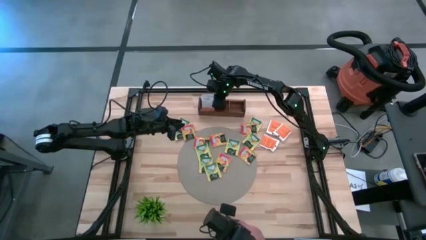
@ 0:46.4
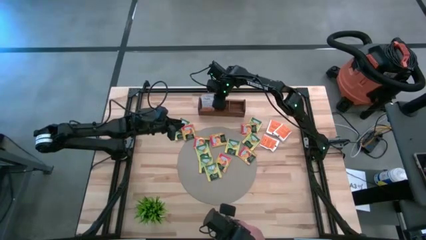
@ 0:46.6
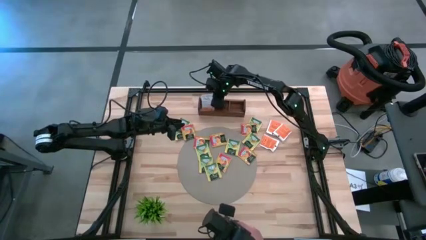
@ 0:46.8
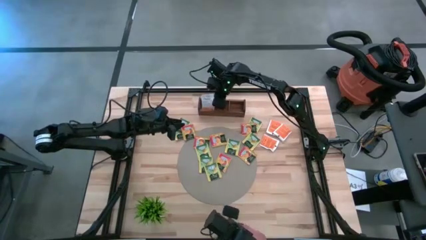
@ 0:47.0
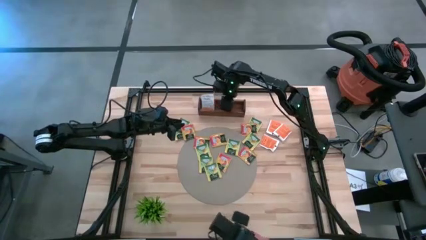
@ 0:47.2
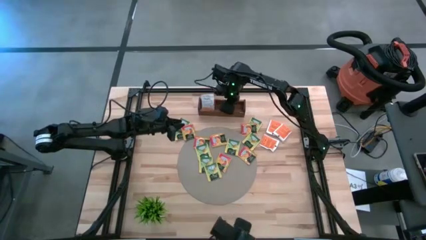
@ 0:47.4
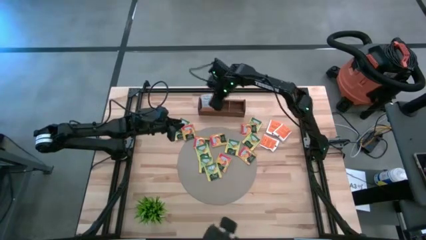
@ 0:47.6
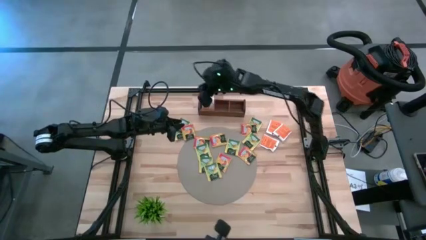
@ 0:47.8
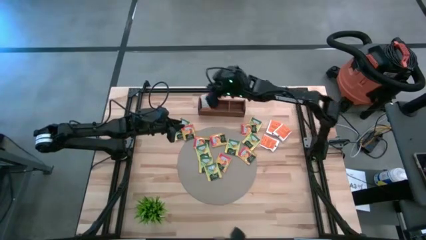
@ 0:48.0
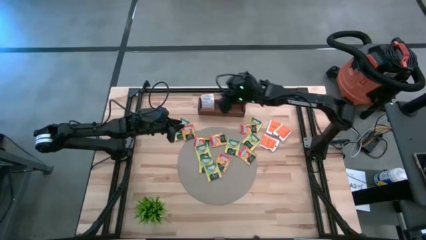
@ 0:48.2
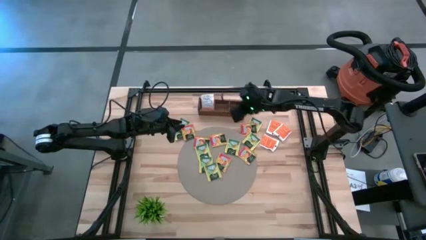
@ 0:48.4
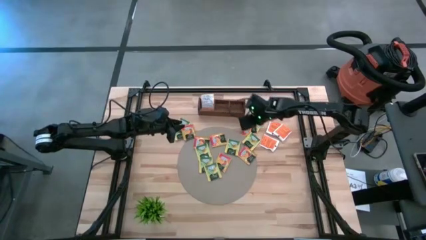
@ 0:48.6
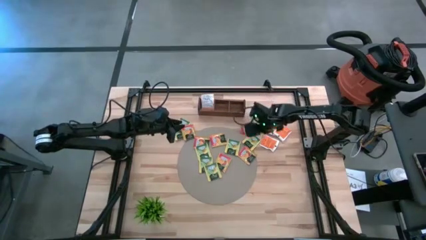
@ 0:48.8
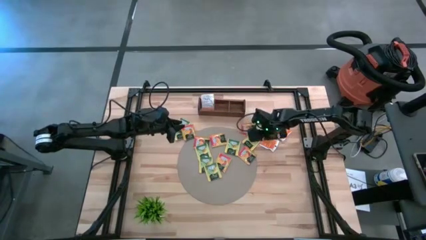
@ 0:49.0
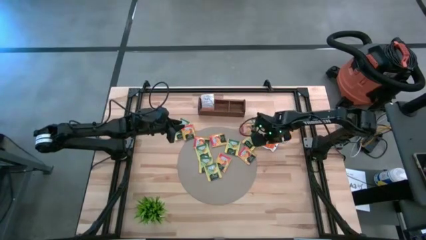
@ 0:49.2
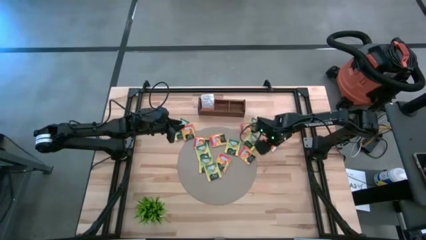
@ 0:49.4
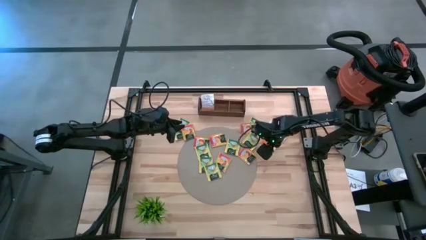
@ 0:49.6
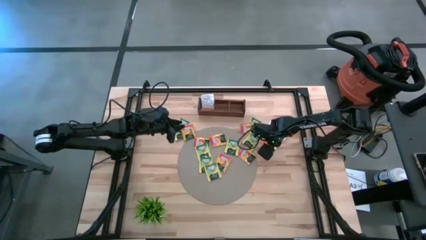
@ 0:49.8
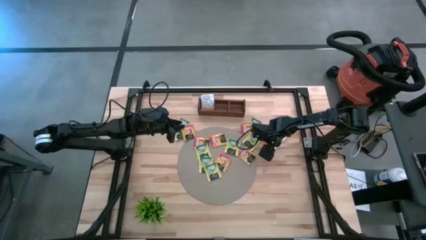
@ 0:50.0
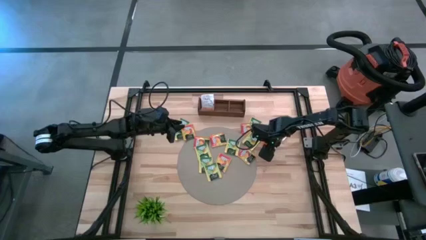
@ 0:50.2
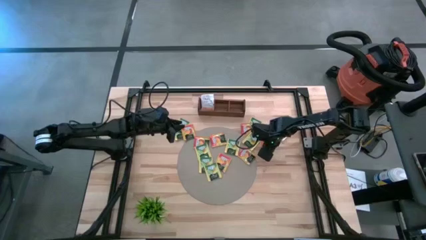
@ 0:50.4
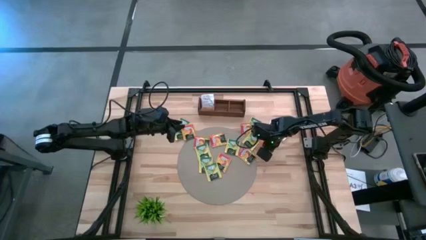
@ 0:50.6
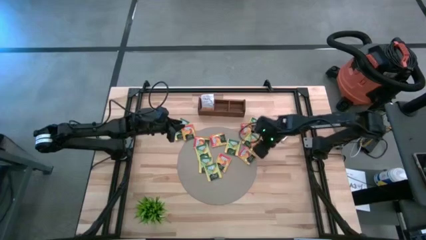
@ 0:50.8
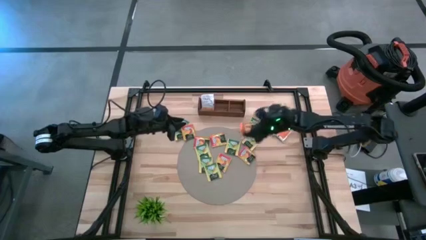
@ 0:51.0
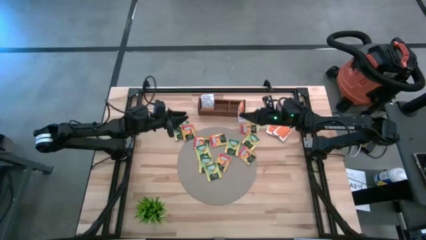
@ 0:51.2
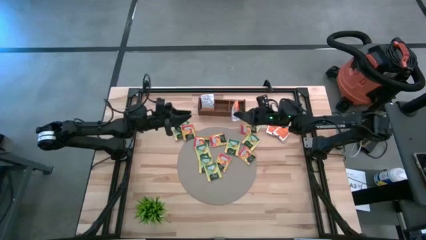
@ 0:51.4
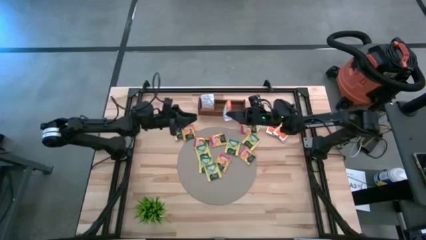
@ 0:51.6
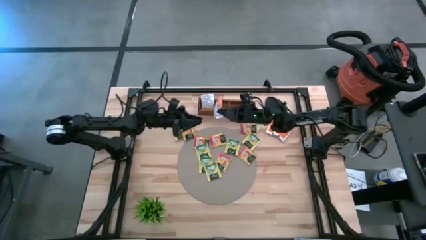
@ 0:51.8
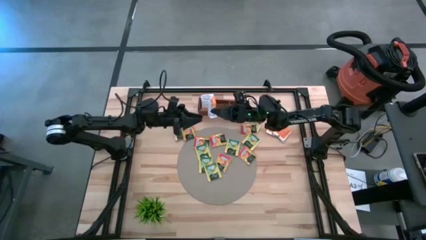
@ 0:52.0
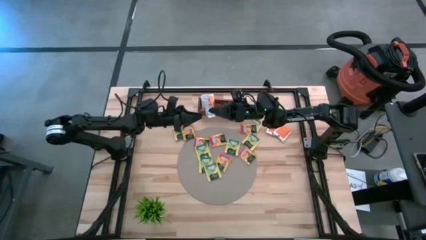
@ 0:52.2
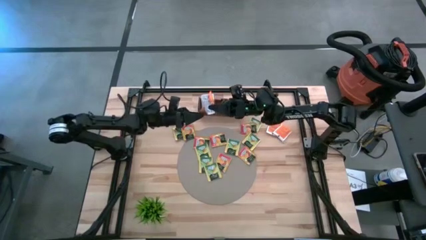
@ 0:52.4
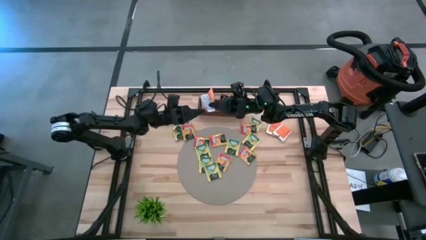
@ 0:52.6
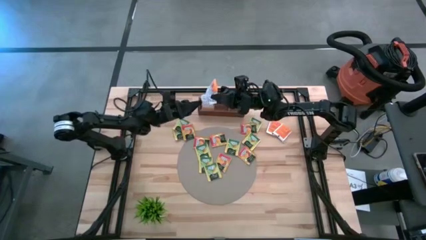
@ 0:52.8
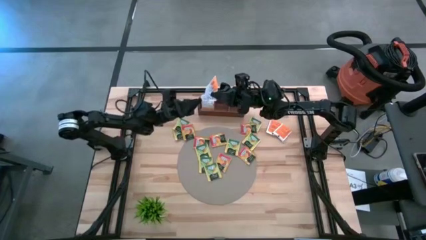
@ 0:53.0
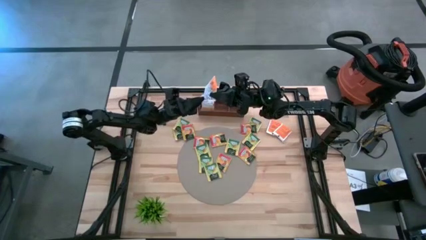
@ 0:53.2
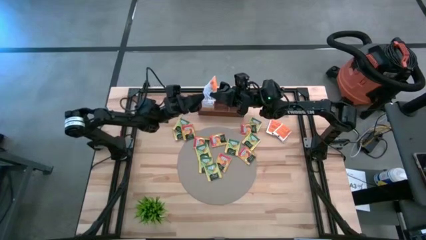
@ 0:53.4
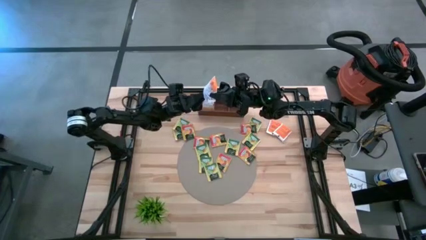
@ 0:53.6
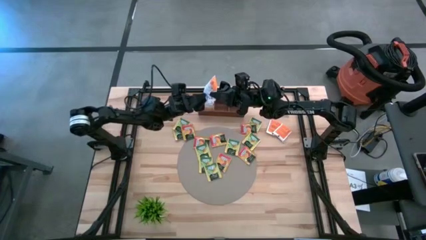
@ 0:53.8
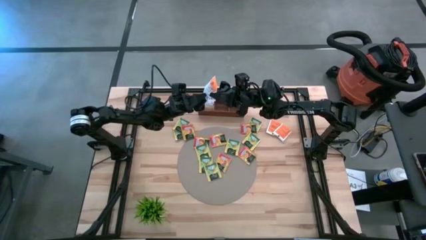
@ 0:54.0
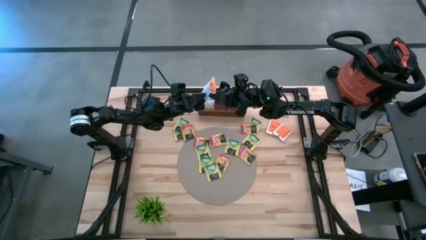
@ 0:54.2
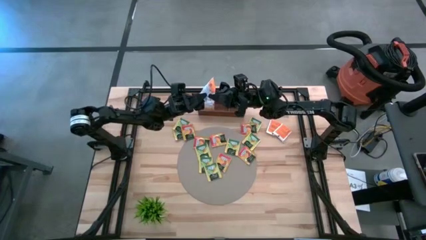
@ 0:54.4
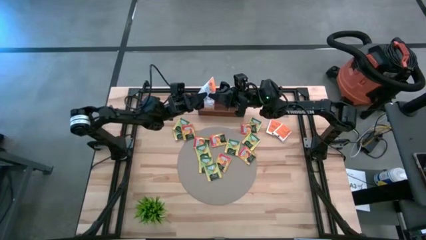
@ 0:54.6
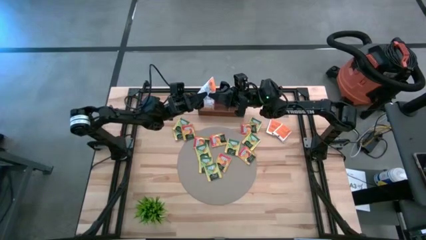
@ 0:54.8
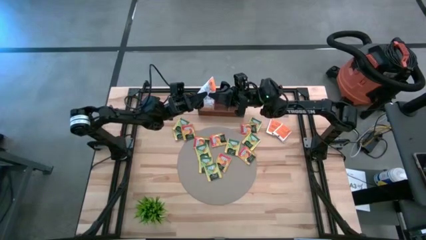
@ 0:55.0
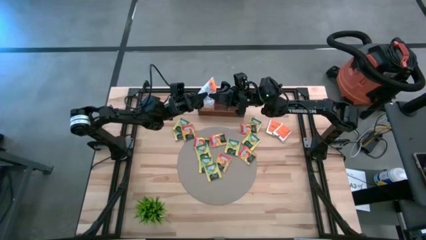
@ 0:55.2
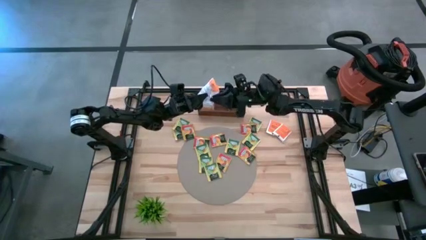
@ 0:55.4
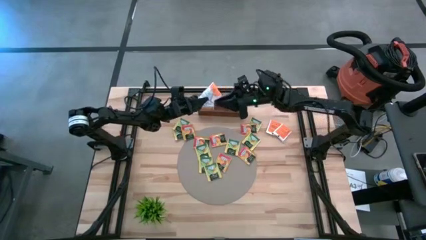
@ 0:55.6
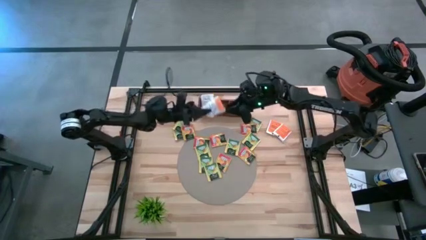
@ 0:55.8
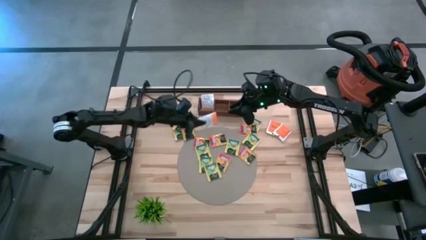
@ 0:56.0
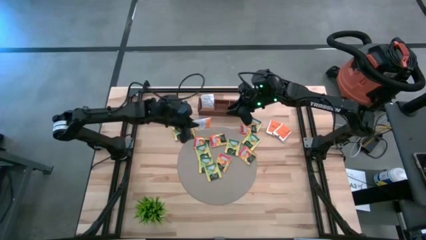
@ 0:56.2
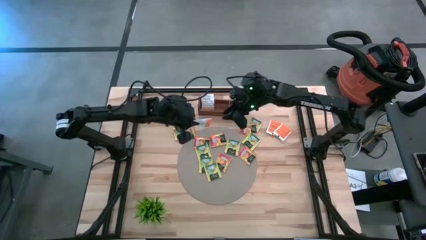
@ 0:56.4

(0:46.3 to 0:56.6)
Task: Pick & Place Tea
Put the white tea bag into the left section of the wooden organizer
